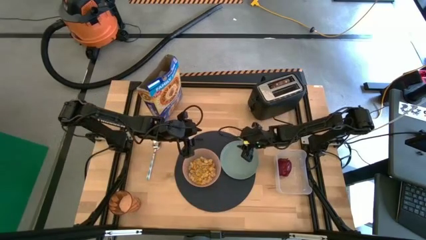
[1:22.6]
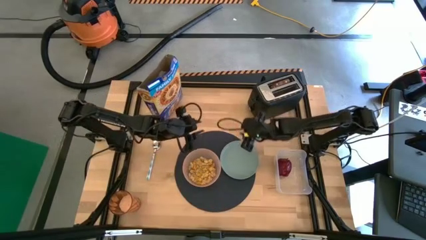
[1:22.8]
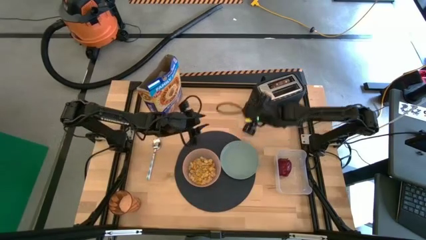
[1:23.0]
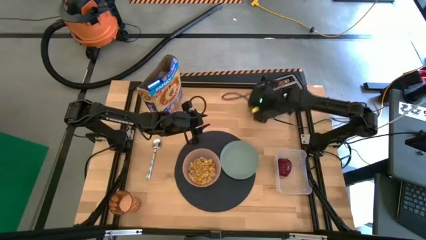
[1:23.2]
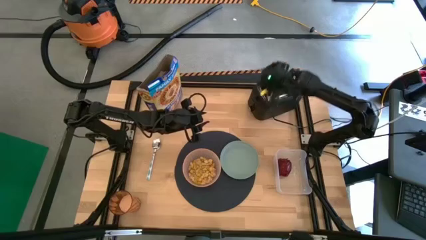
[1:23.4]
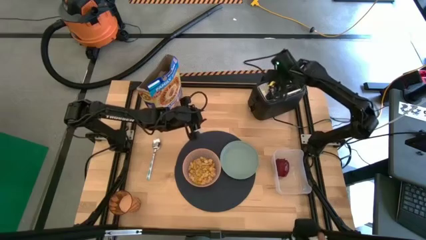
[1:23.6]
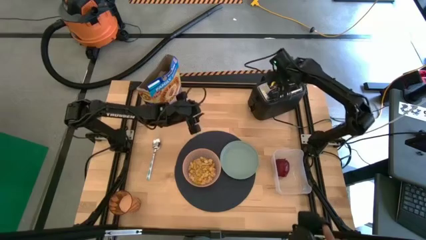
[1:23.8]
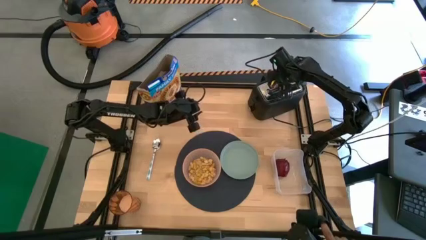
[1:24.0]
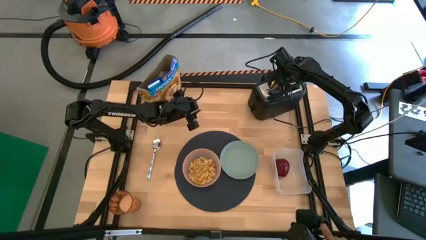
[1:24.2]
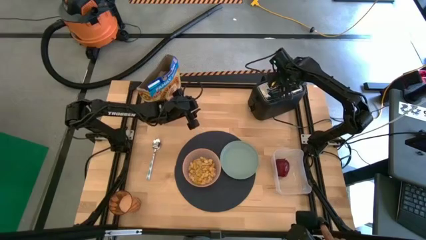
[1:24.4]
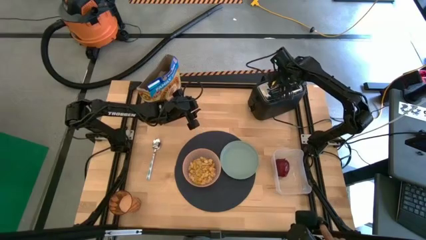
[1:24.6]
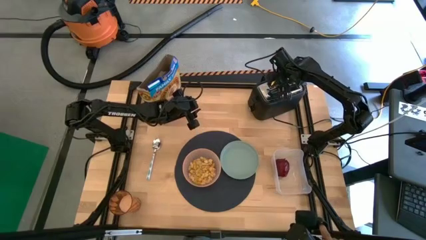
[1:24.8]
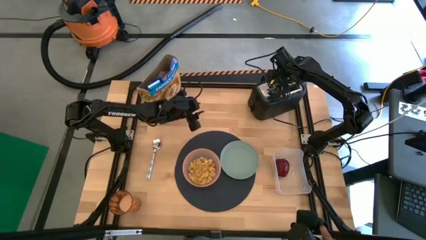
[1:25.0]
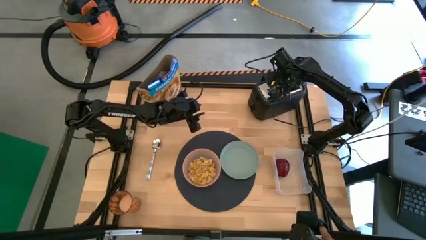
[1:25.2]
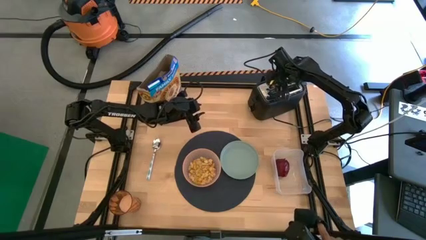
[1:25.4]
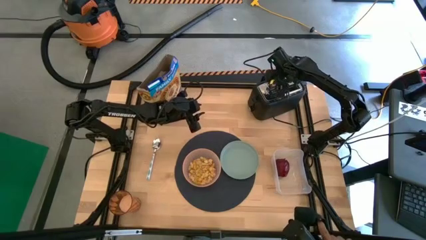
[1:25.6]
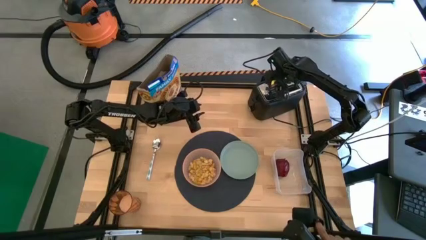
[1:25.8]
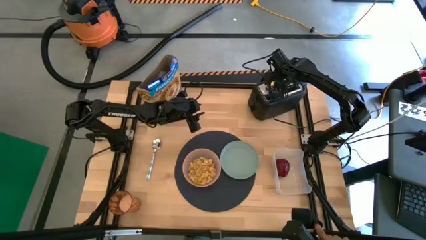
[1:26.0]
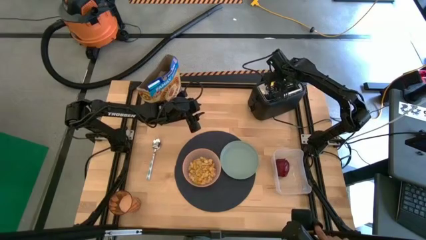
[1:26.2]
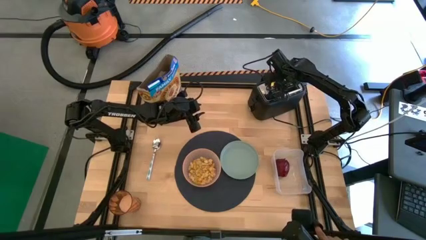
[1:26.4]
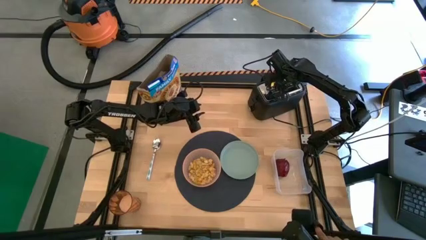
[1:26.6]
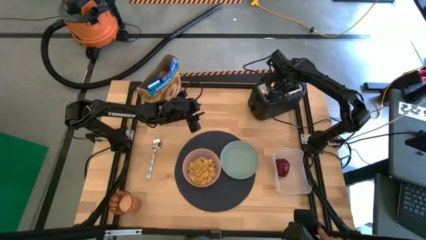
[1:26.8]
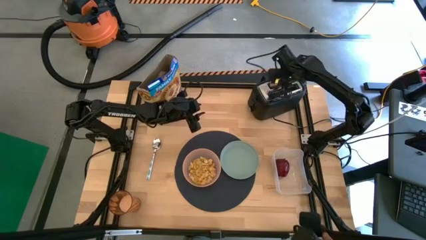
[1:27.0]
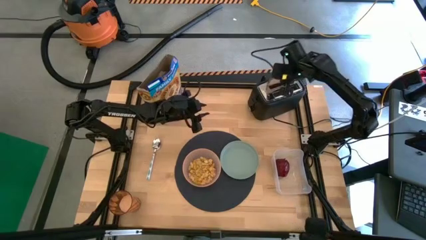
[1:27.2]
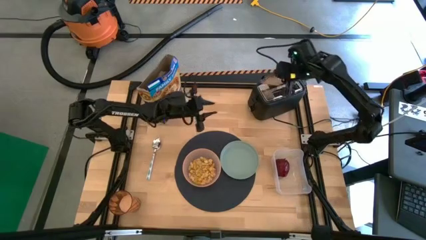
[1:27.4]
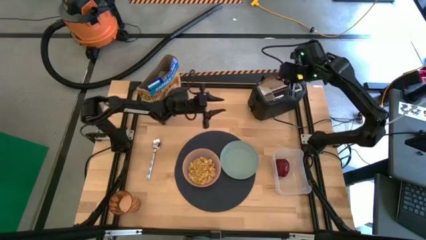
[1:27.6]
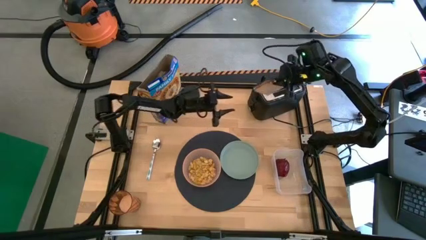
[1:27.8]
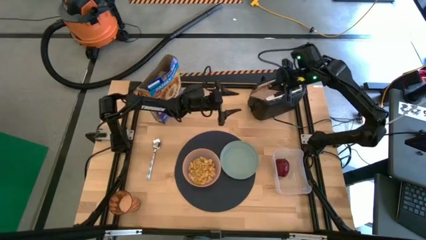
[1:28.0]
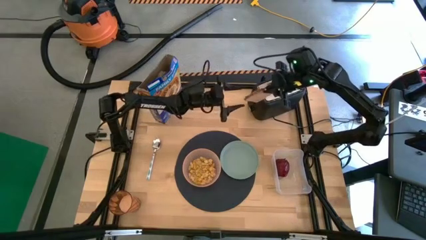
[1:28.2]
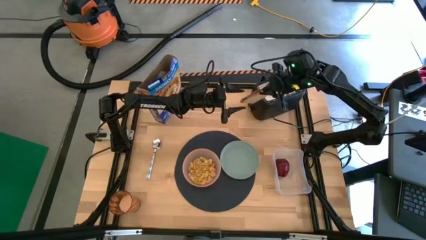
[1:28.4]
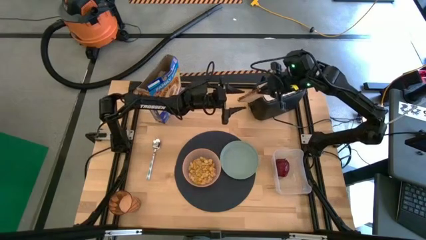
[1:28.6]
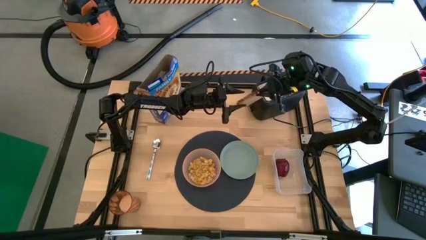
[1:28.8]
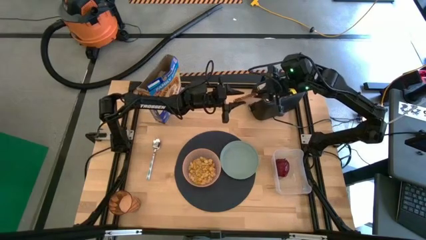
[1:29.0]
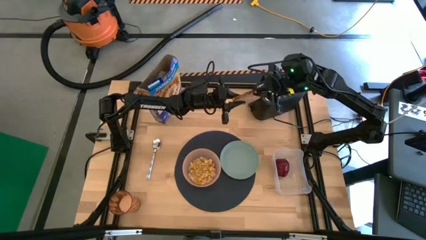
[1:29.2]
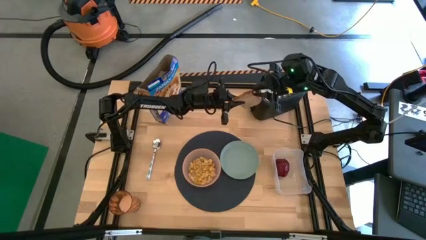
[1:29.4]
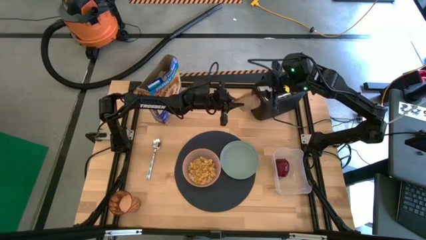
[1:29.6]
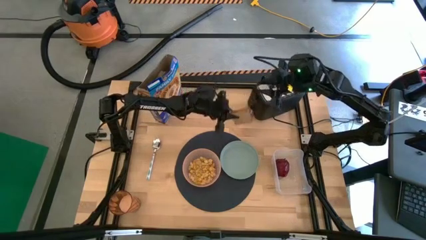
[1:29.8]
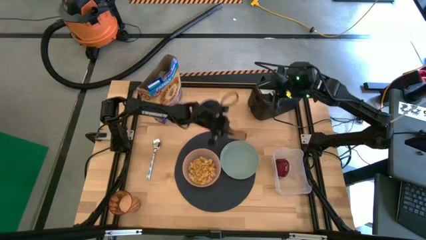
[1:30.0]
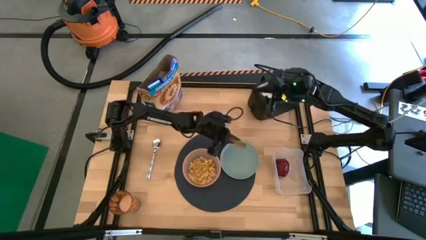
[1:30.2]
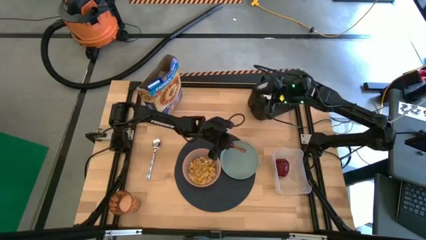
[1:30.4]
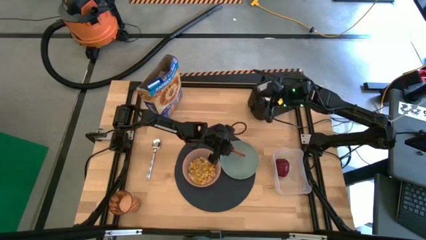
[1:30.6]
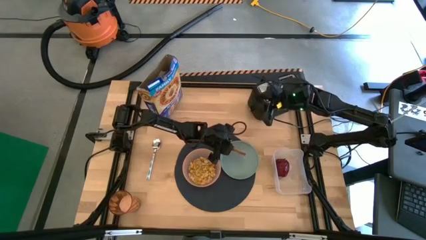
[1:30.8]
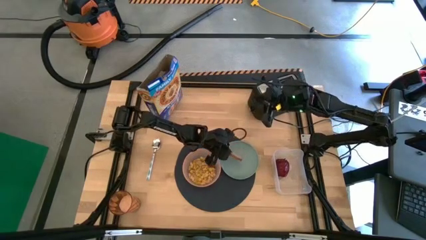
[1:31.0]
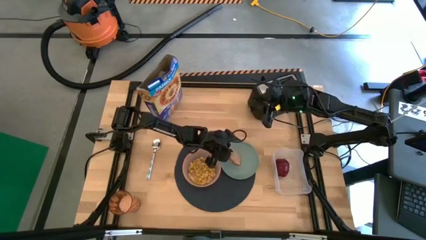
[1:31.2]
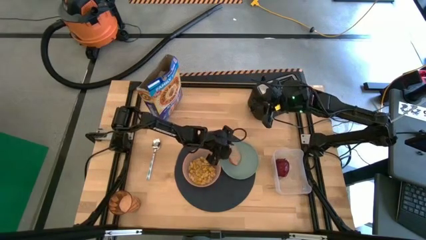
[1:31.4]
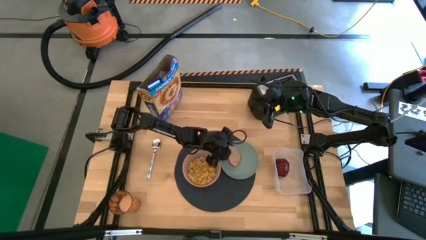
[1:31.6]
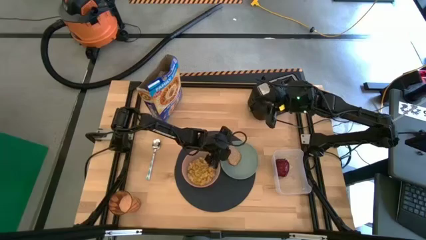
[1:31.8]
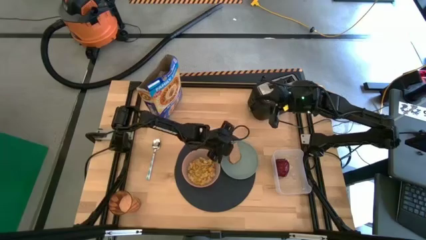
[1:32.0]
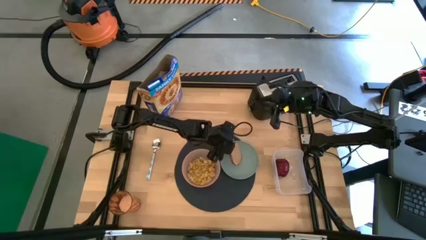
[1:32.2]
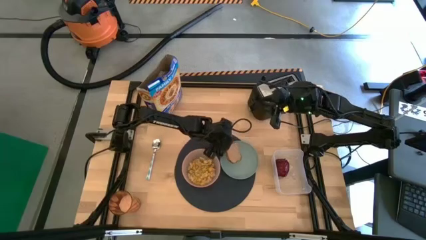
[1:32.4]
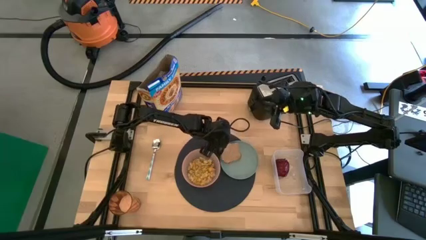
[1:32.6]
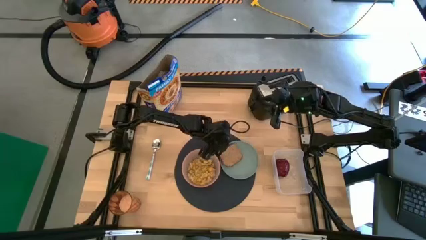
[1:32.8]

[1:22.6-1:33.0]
Task: Arrange a breakfast setting
Put the toasted bread from the toaster on the light blue plate
